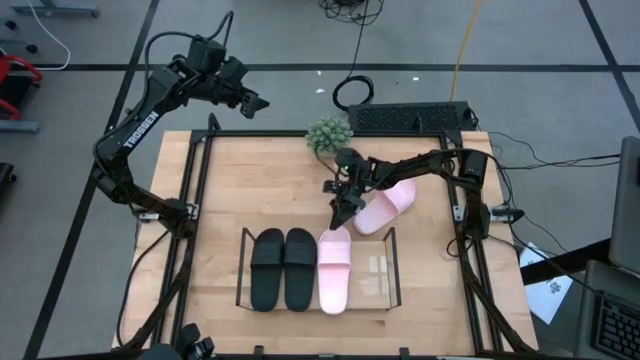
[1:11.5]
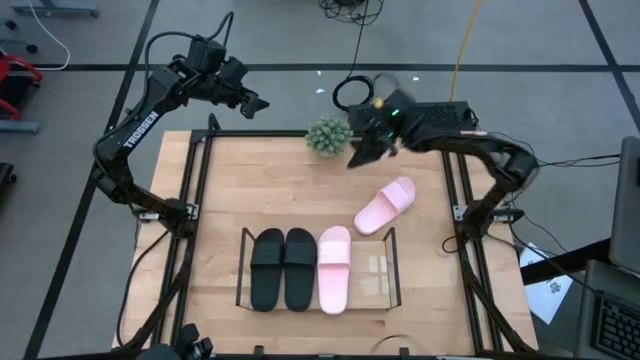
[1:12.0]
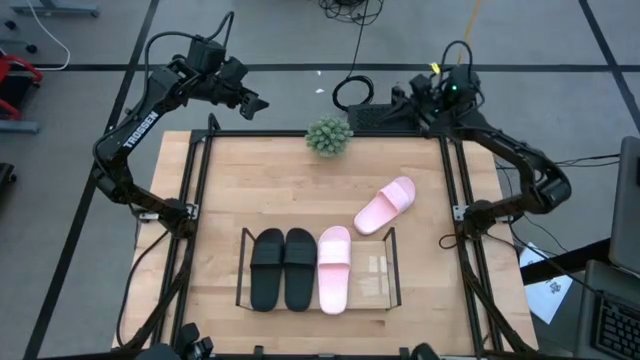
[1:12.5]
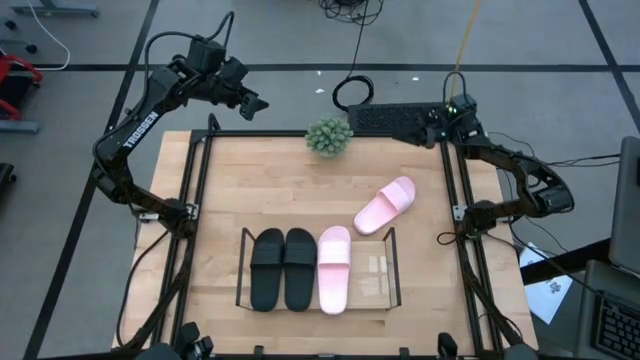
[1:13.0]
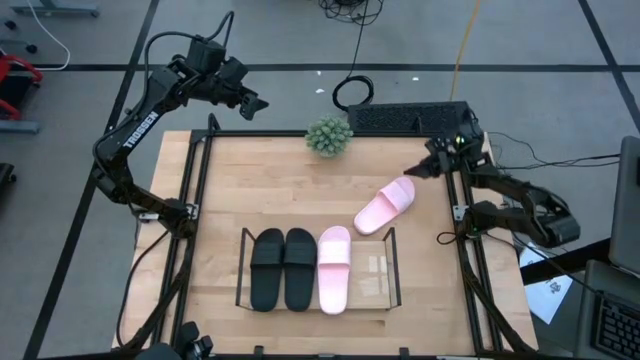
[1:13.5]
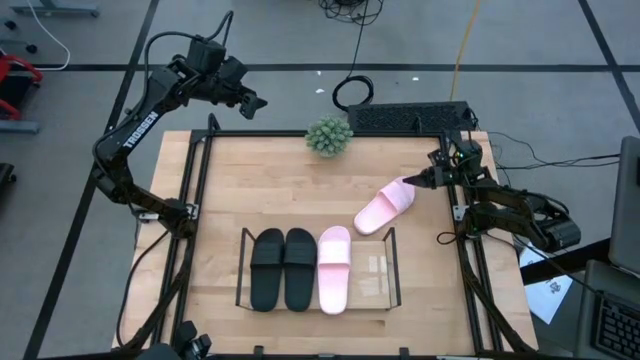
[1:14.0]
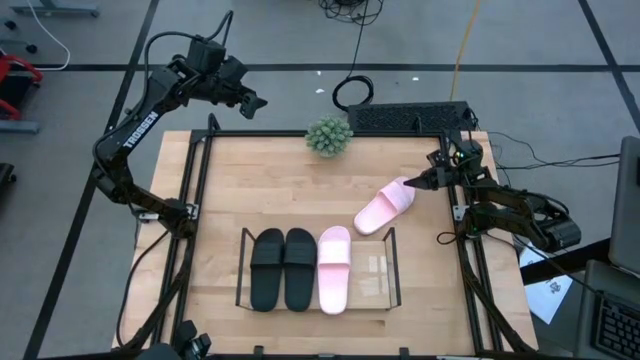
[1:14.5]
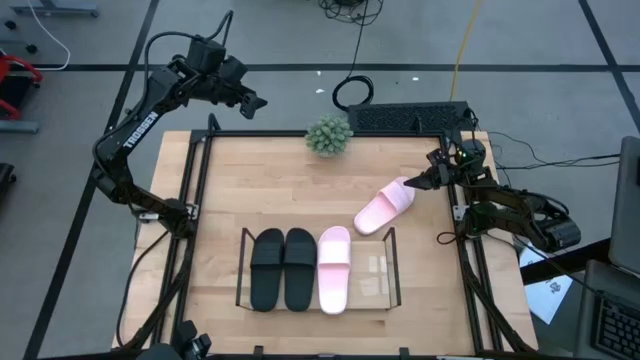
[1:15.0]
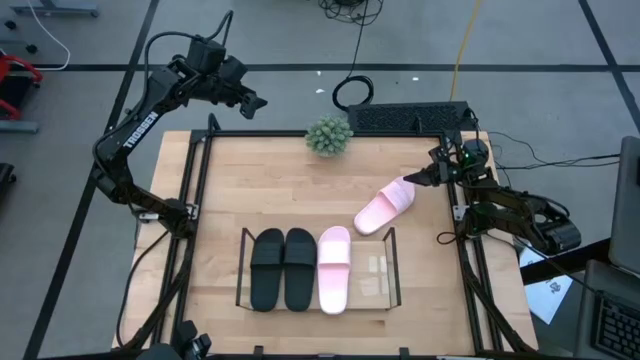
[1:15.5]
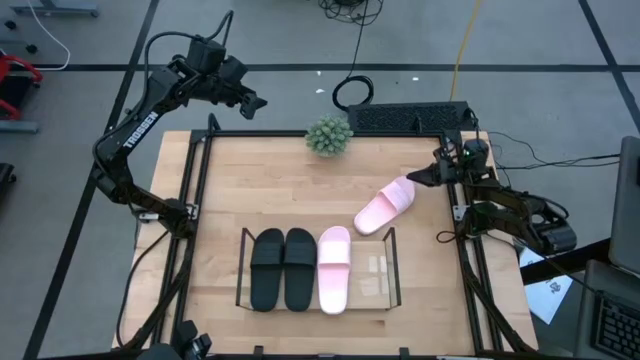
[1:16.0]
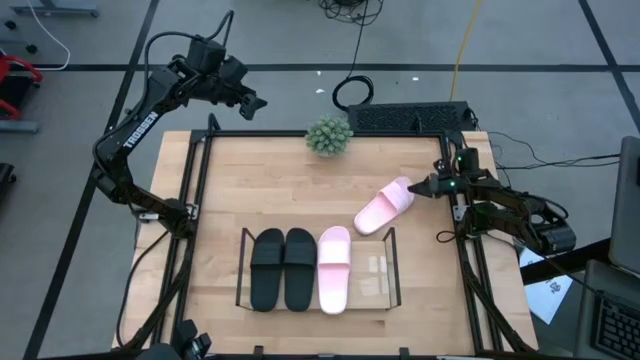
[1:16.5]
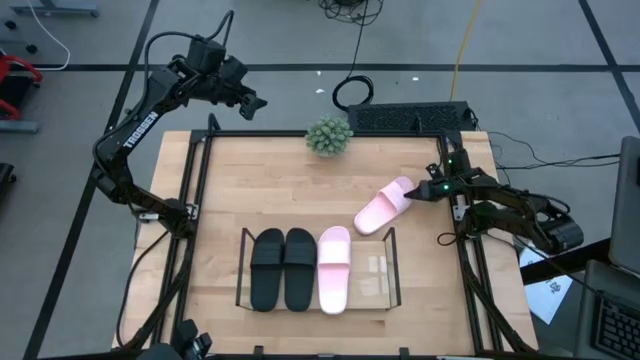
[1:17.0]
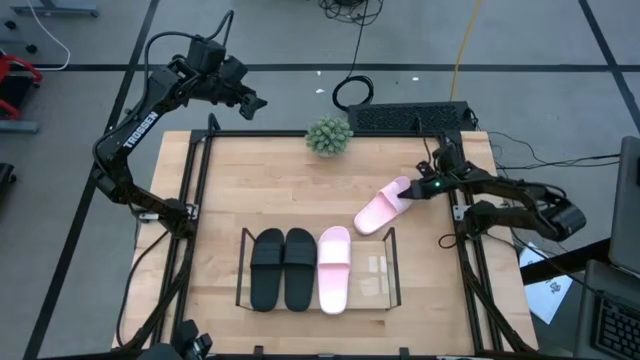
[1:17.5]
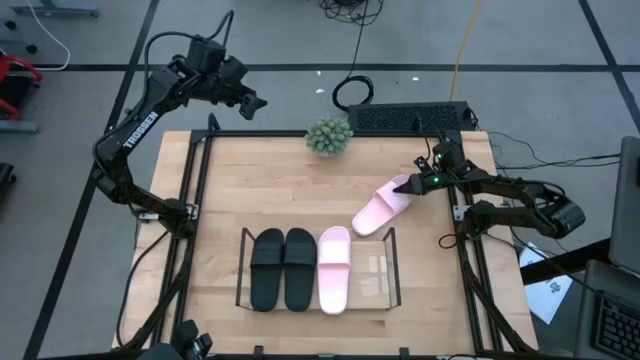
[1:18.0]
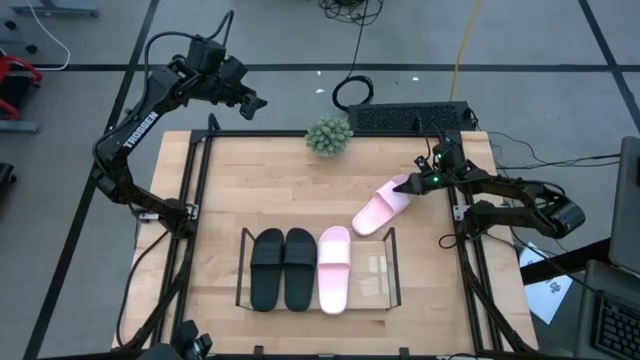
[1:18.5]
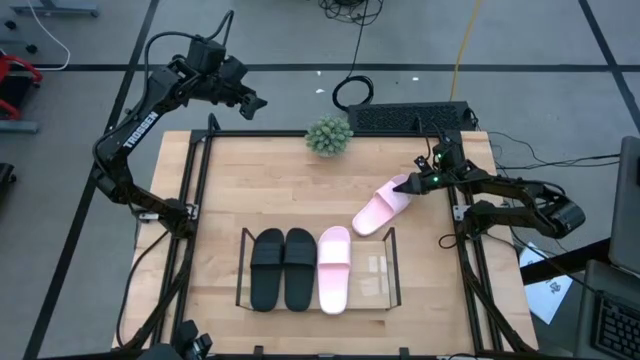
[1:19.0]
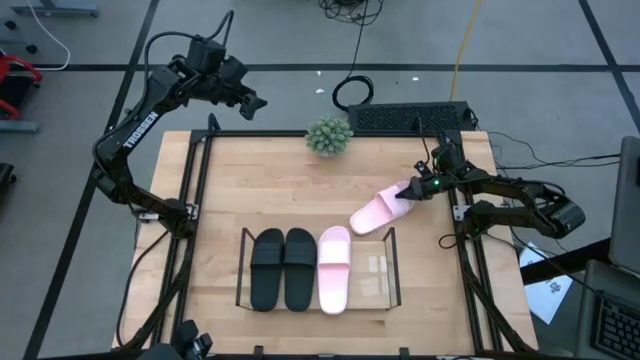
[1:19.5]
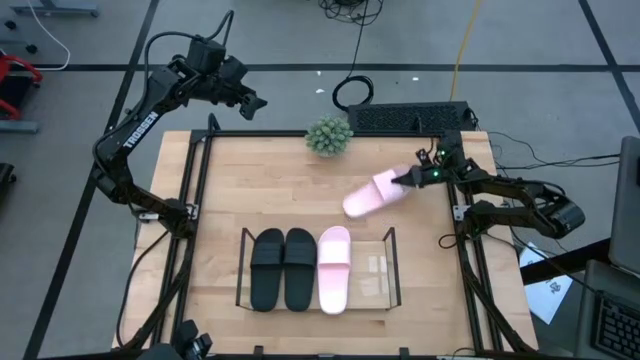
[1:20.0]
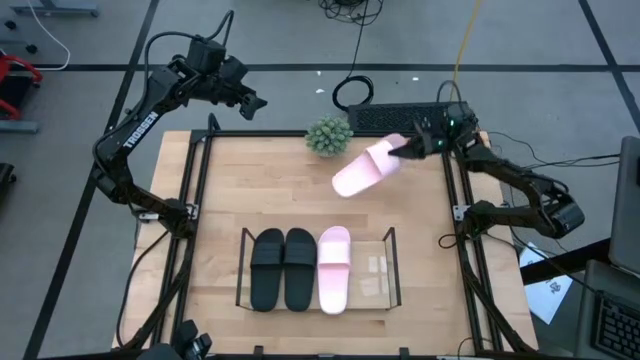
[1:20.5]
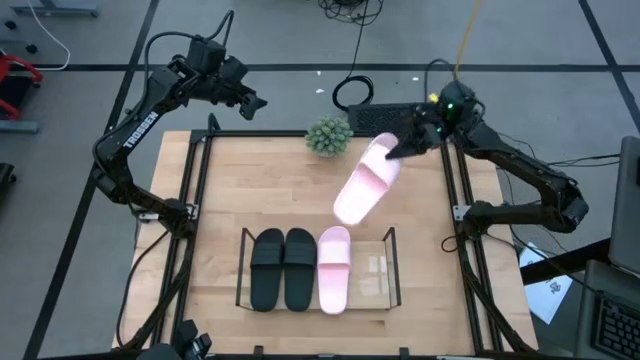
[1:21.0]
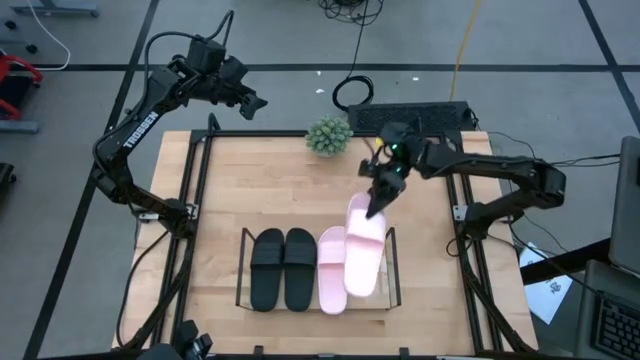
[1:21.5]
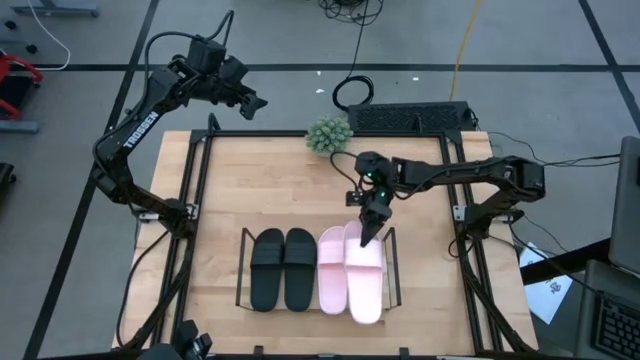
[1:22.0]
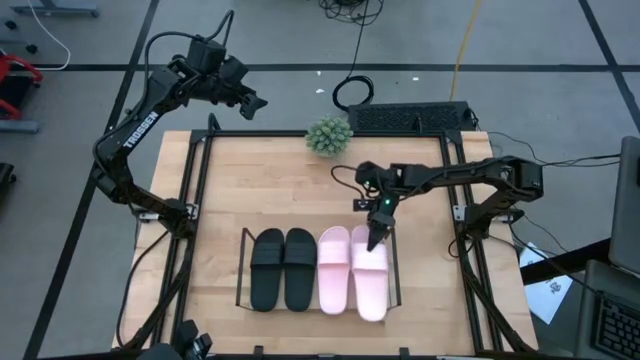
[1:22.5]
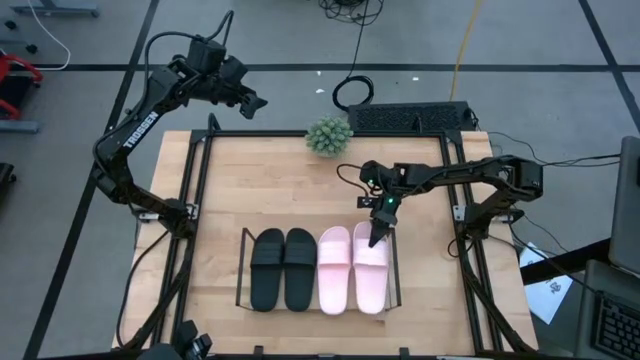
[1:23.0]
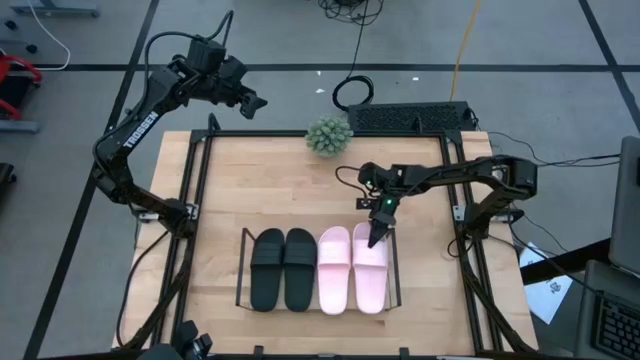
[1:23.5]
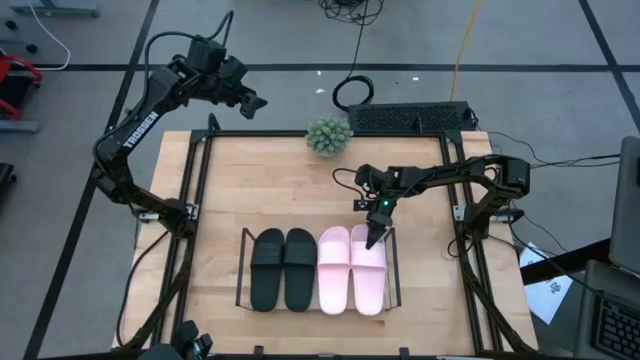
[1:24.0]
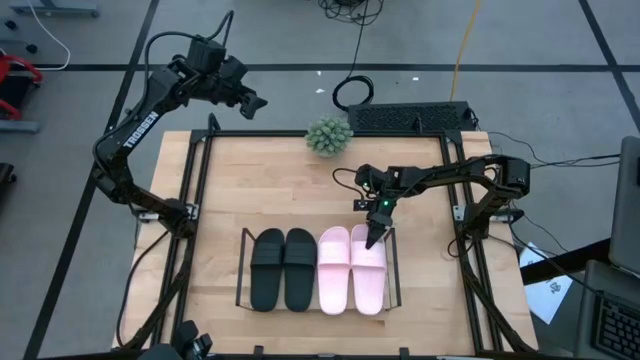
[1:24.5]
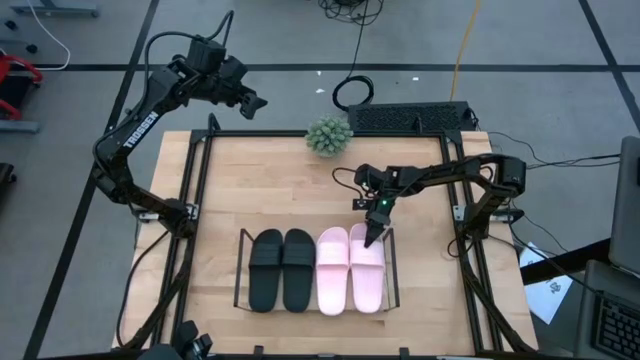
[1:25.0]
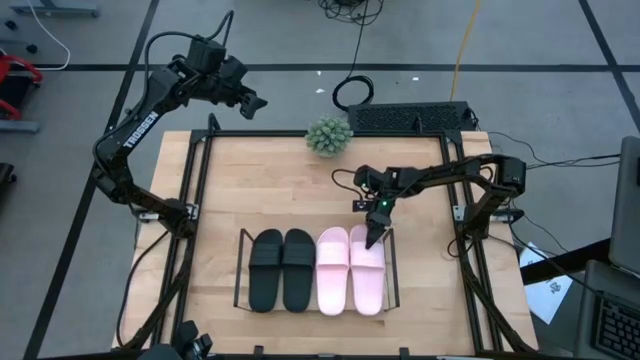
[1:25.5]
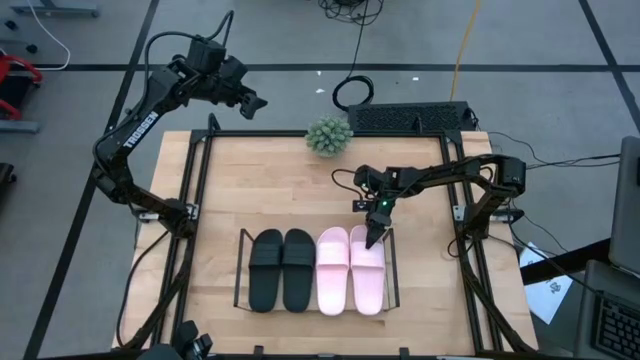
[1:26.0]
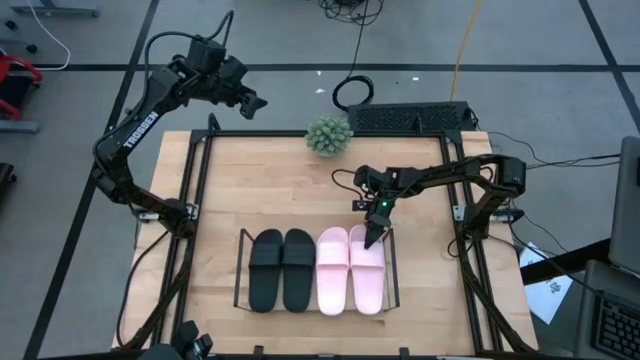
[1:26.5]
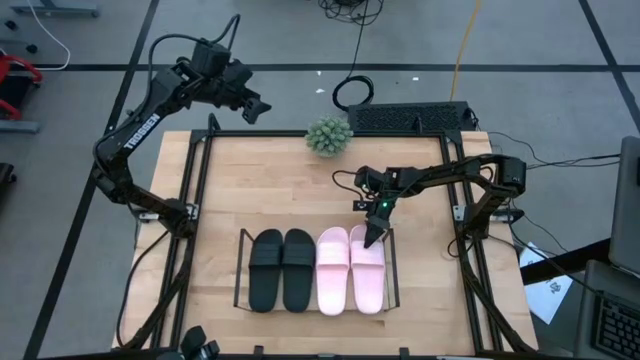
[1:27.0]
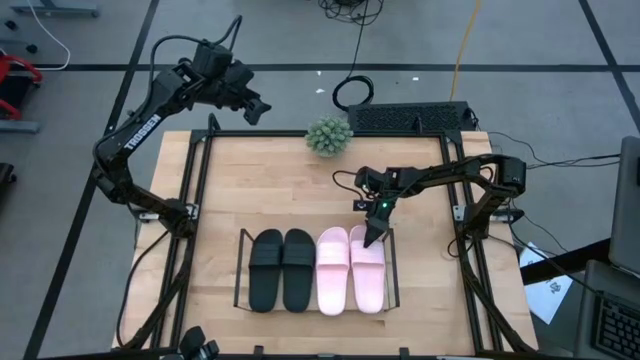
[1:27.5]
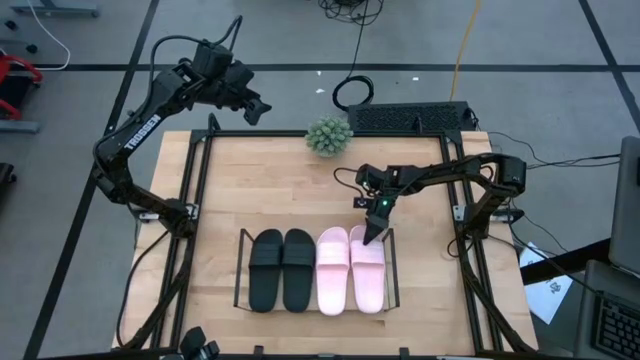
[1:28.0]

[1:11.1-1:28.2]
Task: Pick and place slides into the shelf
Put the pink slipper on the shelf

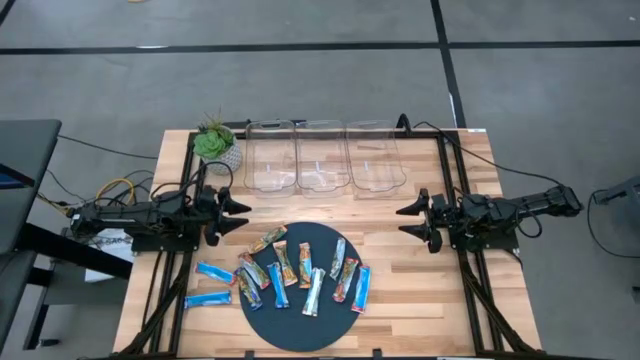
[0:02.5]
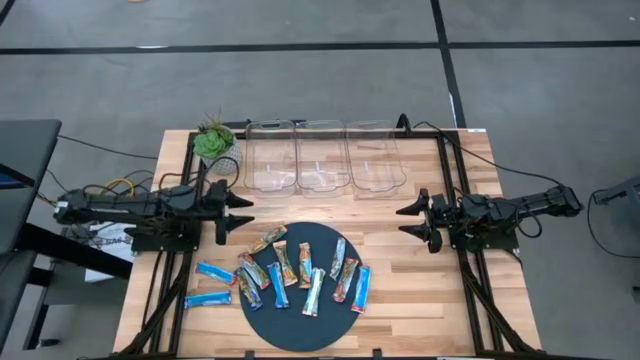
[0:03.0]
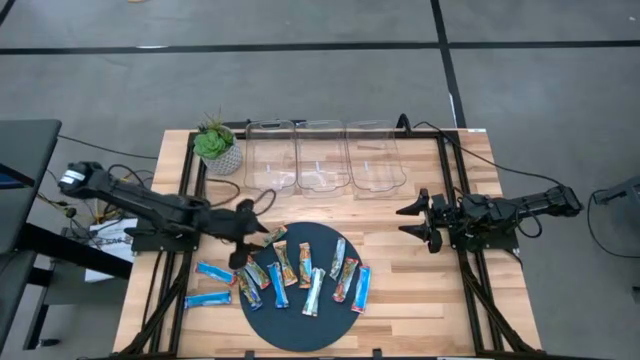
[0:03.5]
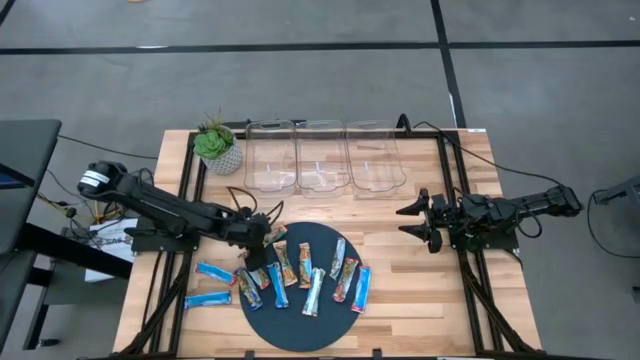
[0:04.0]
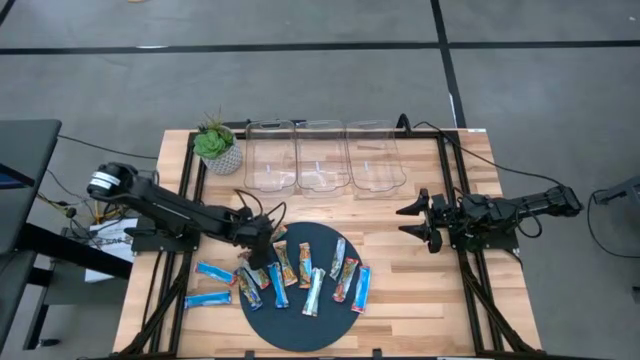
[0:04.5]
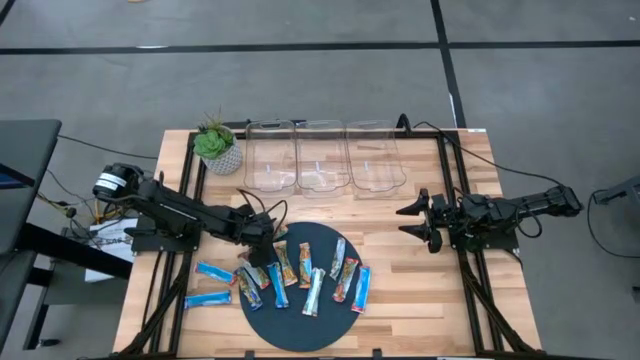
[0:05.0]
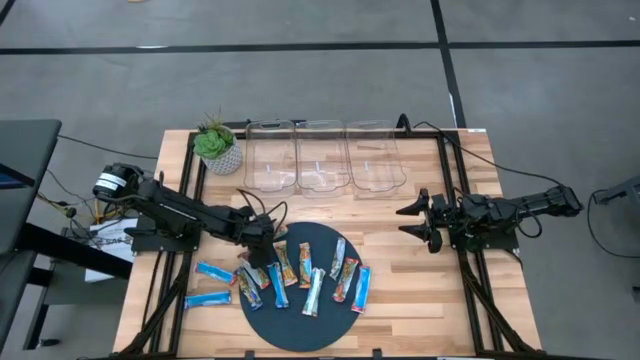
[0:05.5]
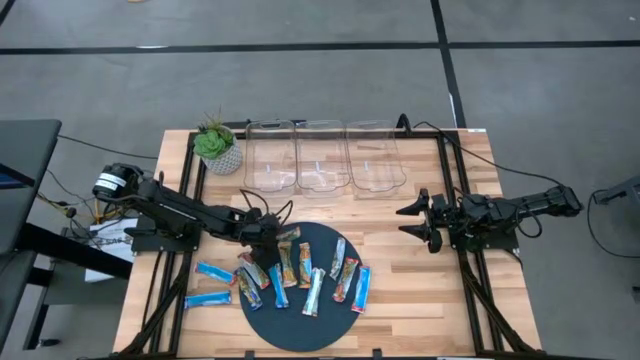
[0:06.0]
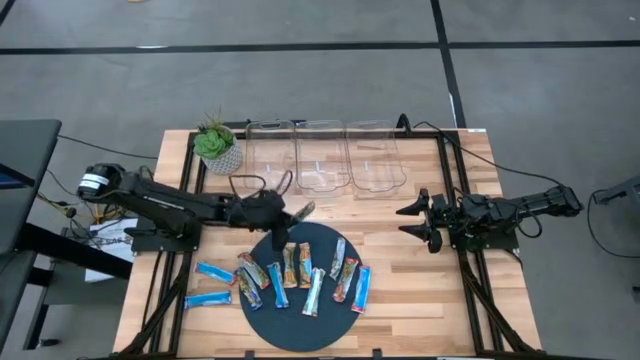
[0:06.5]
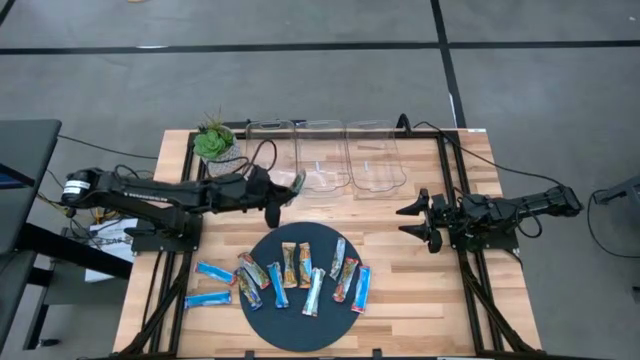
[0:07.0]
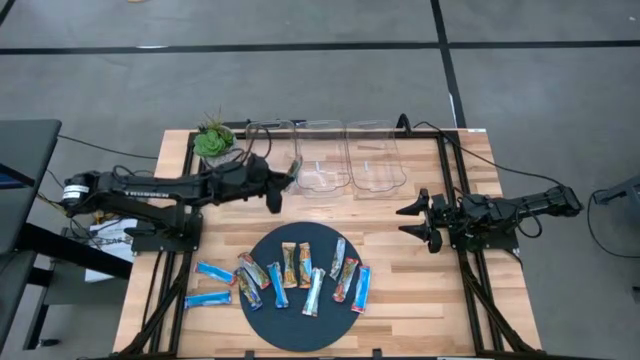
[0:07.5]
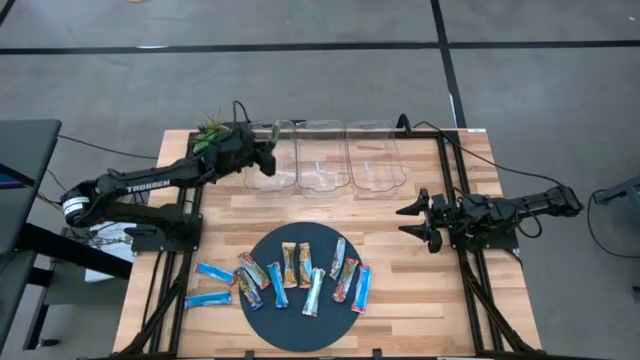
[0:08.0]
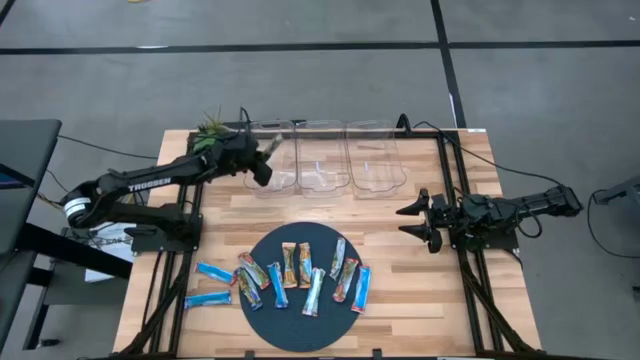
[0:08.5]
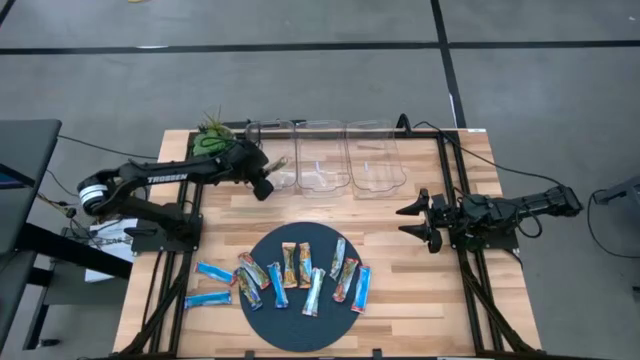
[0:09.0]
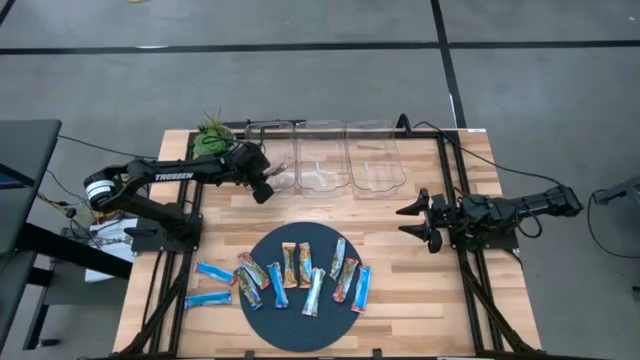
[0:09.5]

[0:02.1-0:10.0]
Task: Pick and place Granola Bars by type
Put the orange bar into the left transparent bin
